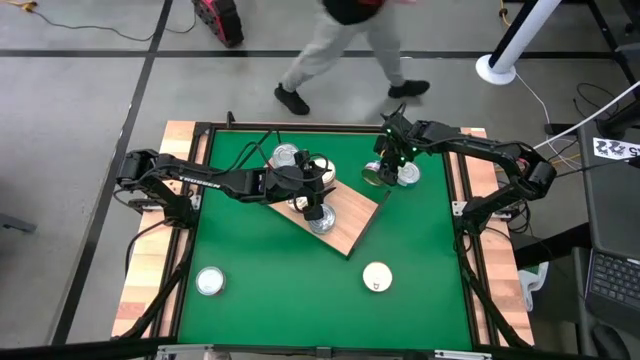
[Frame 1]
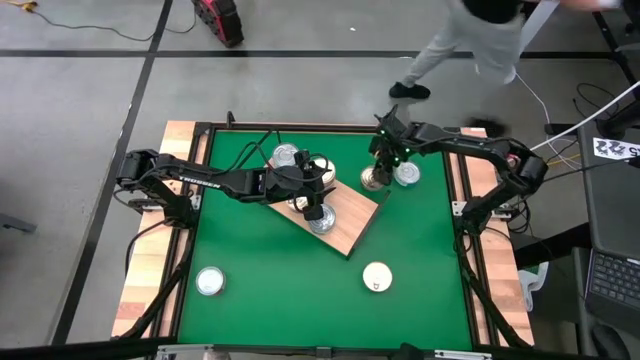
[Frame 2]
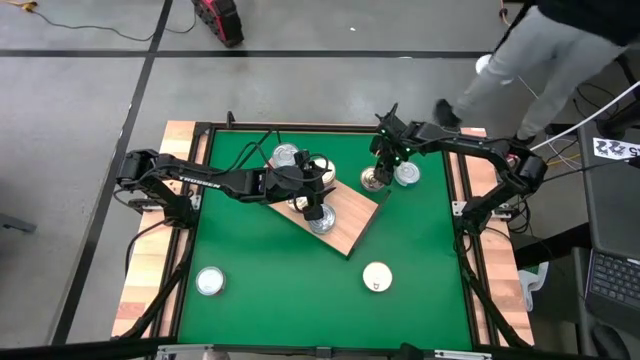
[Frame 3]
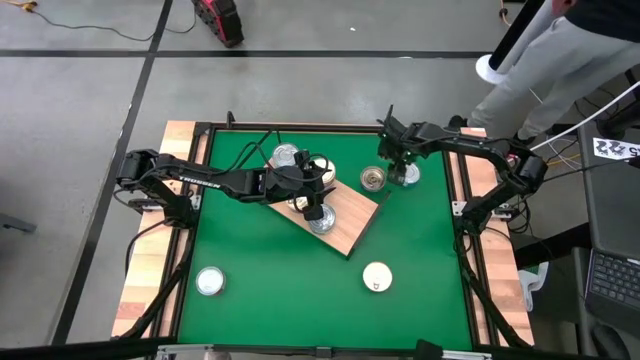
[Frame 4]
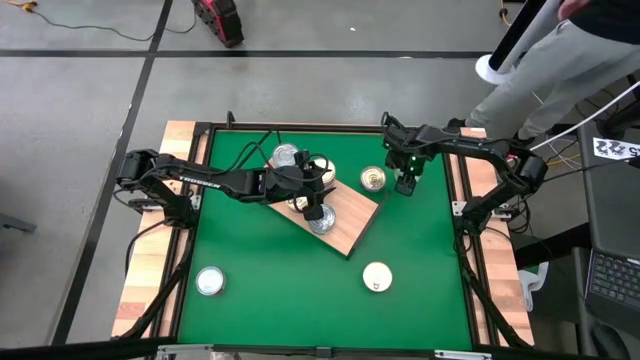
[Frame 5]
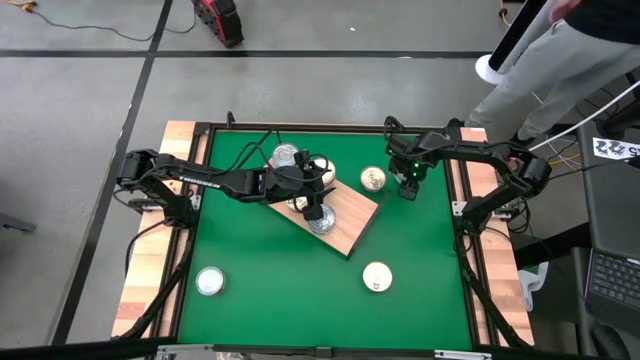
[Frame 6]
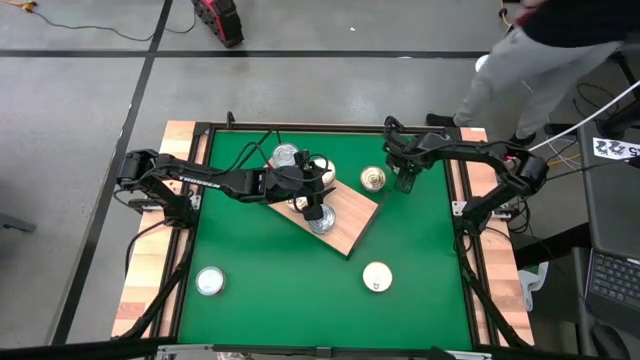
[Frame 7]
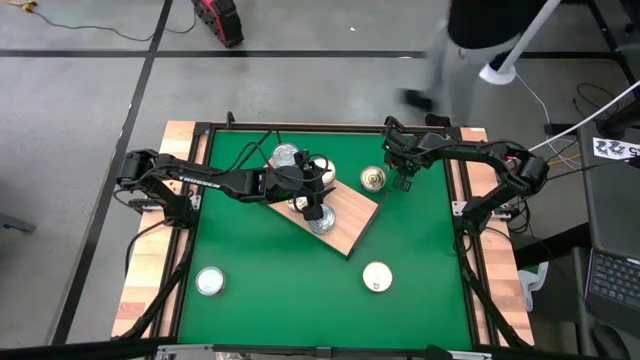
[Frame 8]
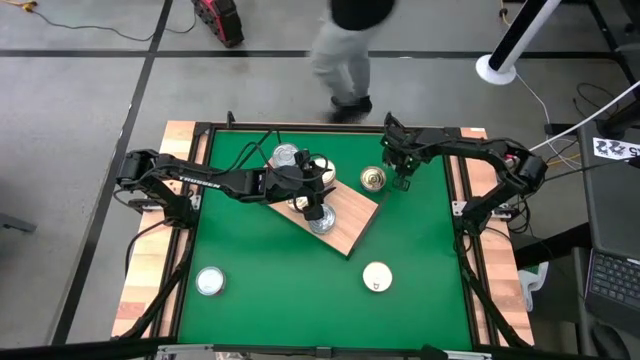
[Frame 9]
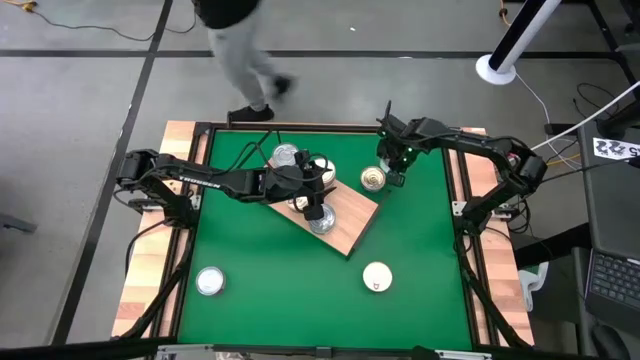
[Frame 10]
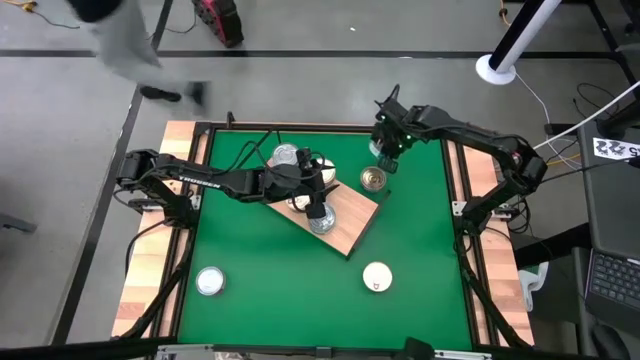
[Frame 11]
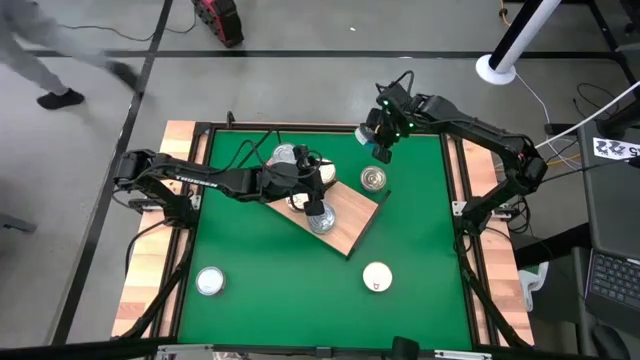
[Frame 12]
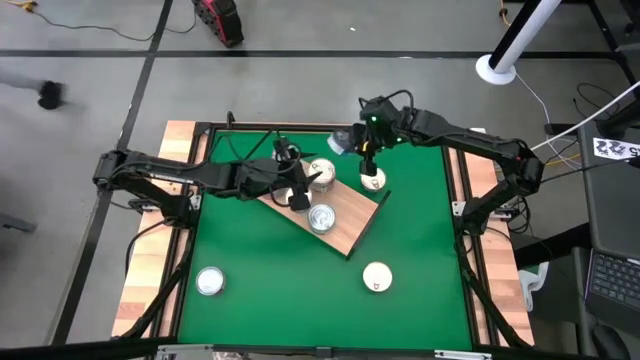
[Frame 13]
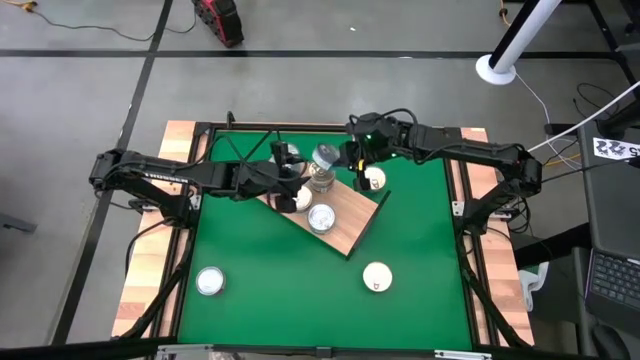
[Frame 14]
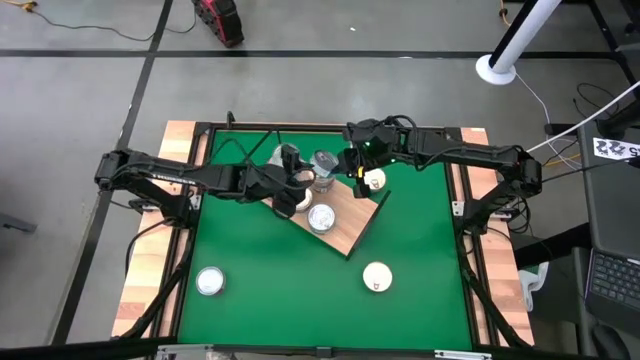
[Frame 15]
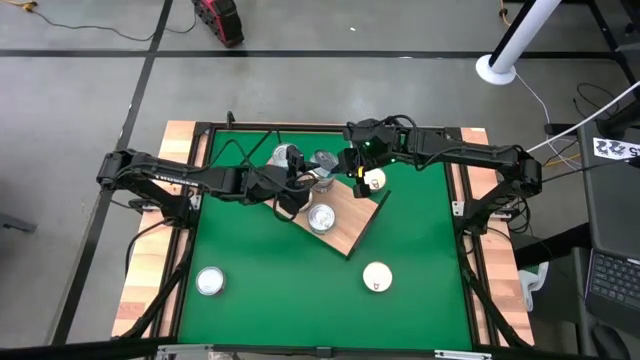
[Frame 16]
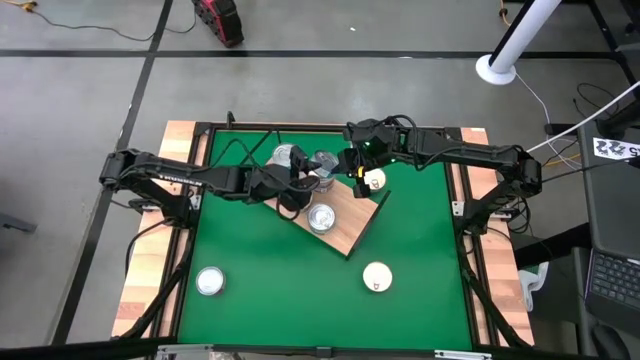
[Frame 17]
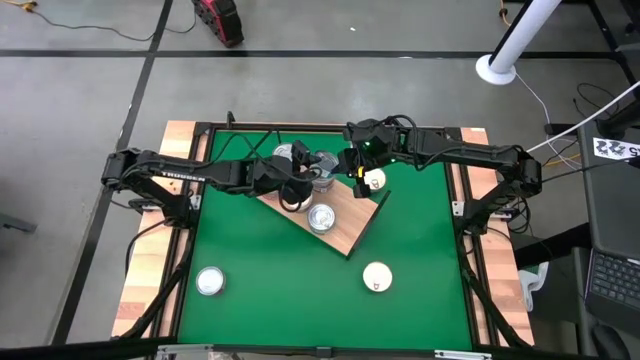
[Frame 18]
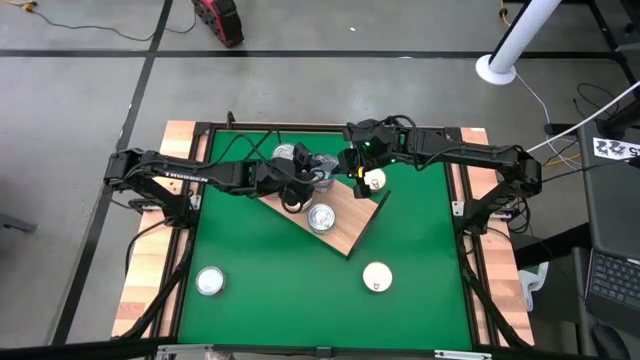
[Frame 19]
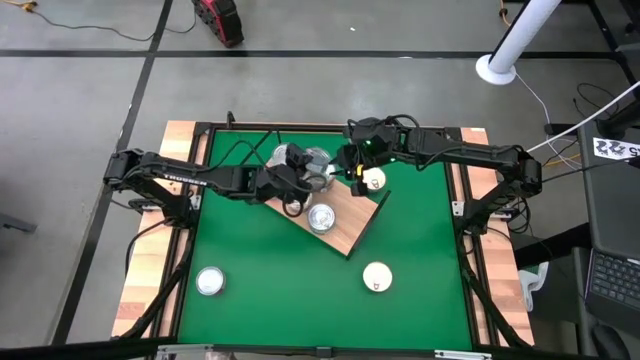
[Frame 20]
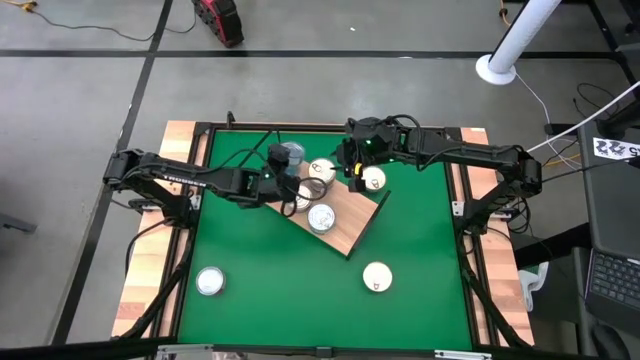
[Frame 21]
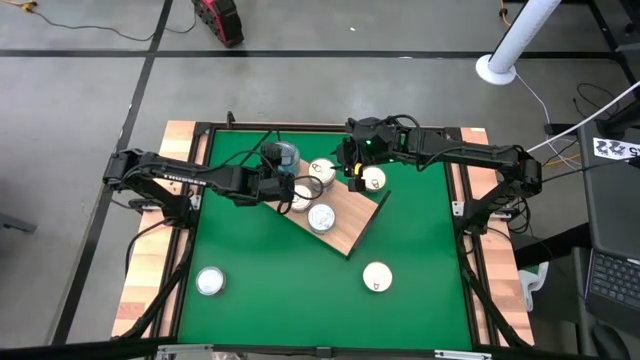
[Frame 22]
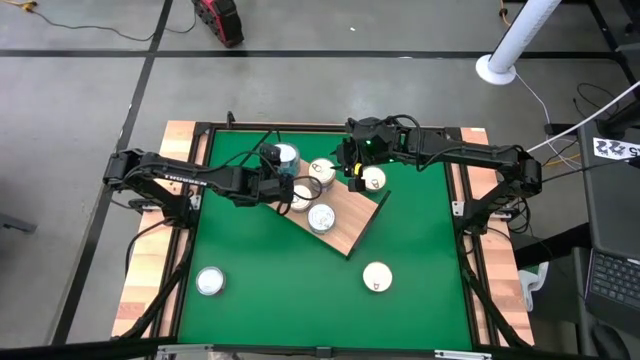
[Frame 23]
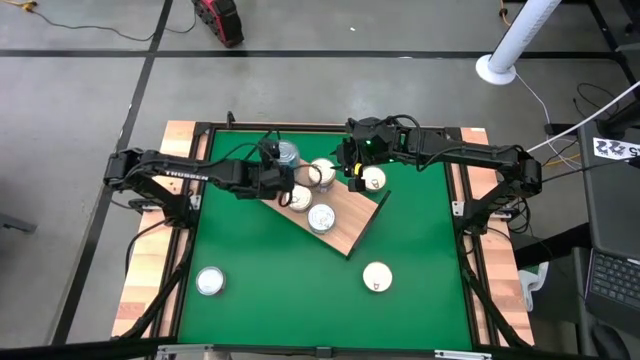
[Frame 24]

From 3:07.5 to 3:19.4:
Task: Stack canned seafood by type on shelf
Stack the blue and pink tuna can on top of the blue and pink tuna can on the shelf

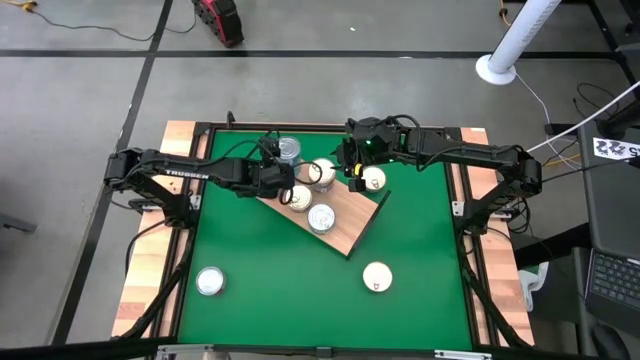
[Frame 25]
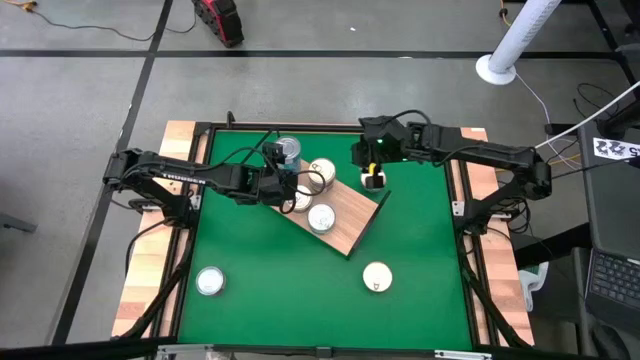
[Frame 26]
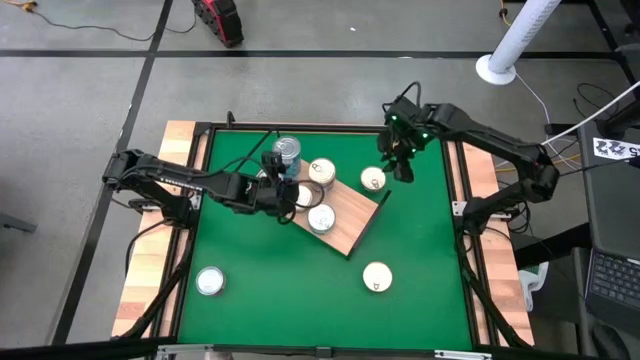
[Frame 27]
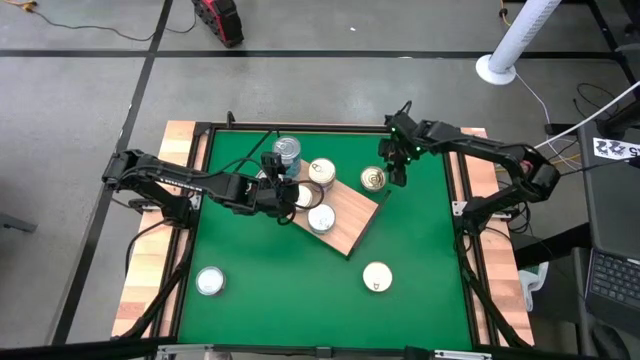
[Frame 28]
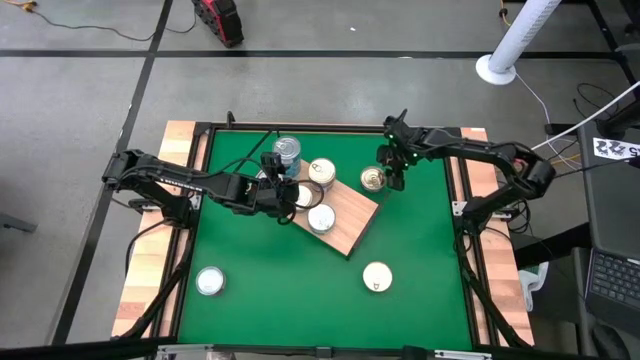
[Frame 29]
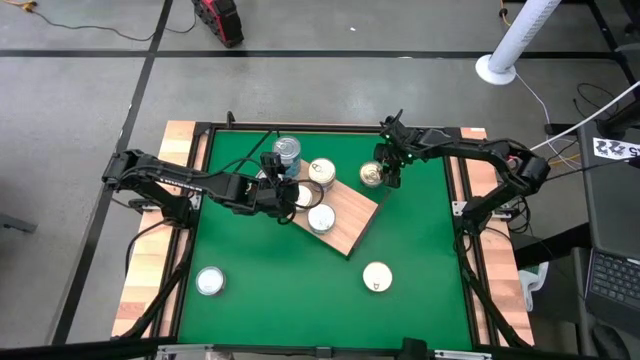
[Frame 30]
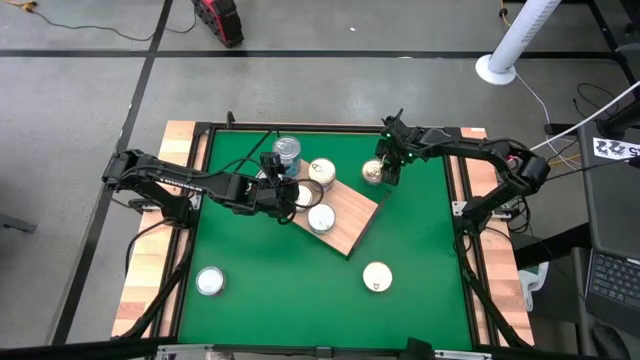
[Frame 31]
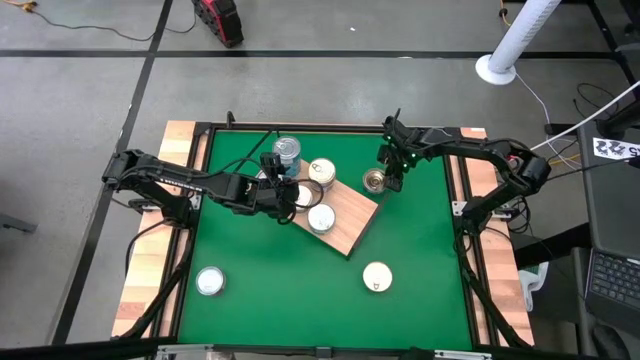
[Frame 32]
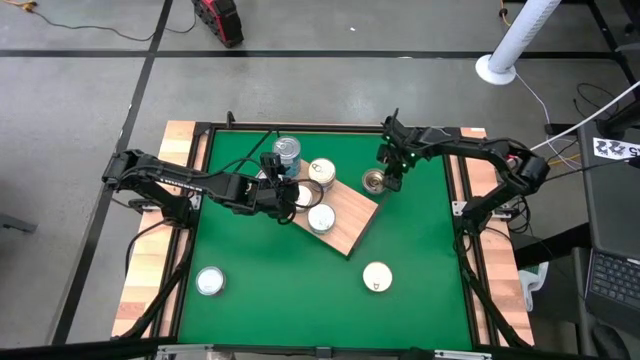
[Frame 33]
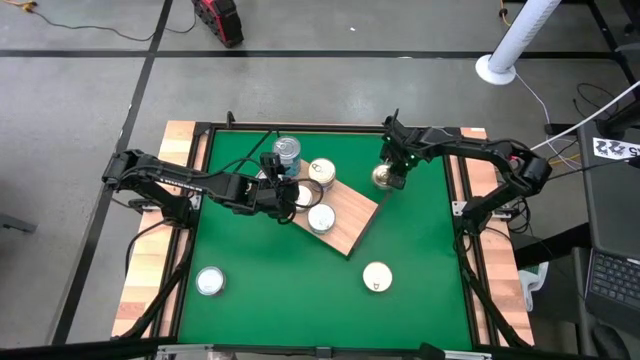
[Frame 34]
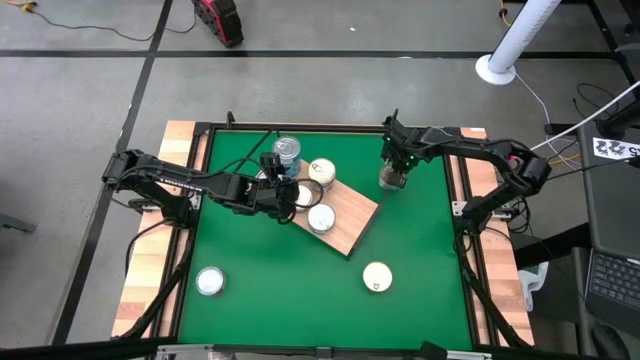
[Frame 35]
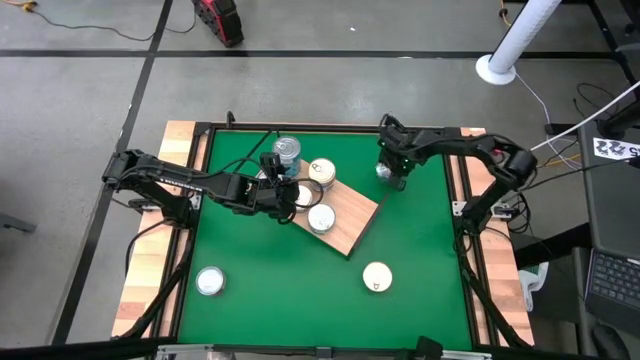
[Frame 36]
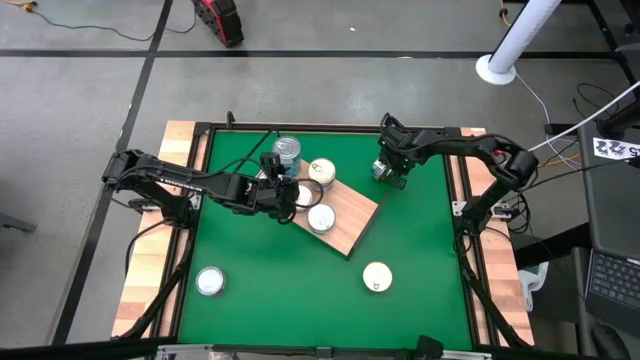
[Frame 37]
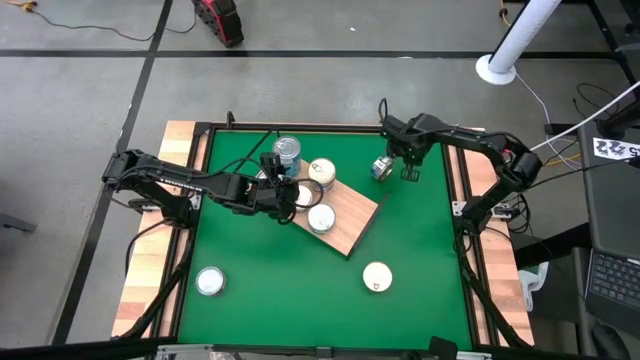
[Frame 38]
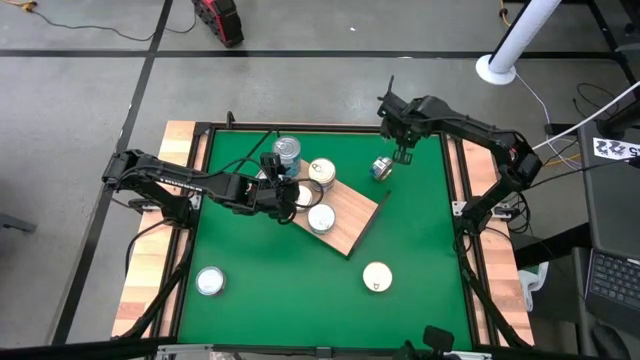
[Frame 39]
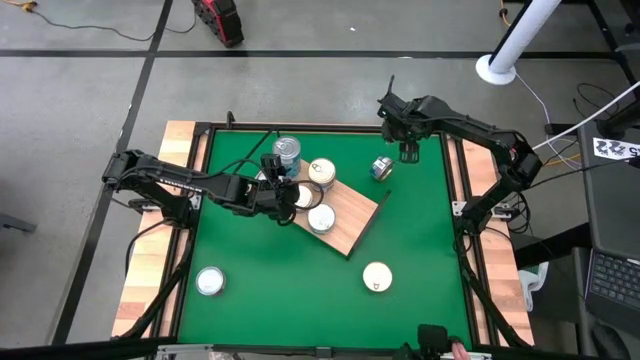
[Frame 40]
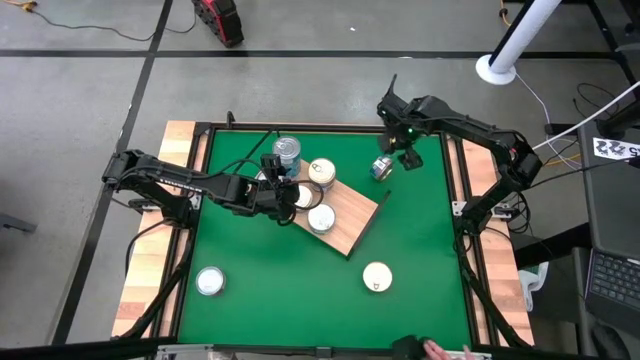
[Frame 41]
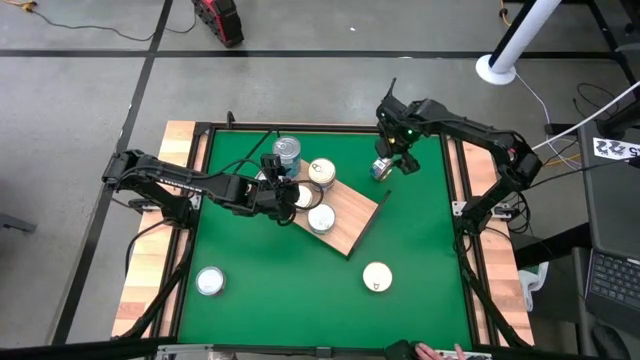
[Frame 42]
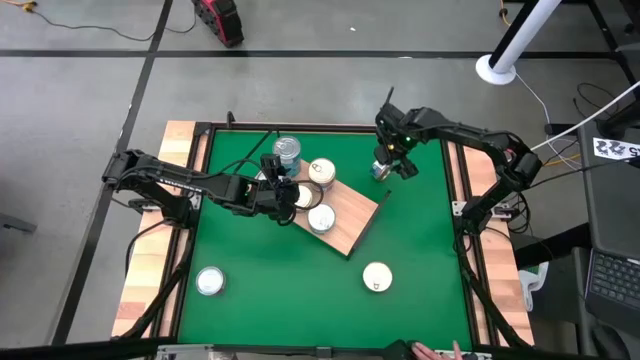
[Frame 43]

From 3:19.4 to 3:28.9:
Stack the blue and pink tuna can on top of the blue and pink tuna can on the shelf
